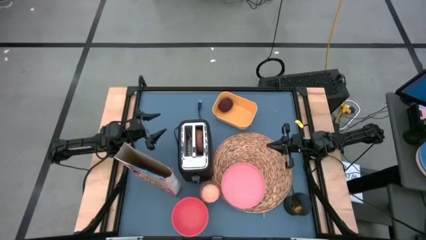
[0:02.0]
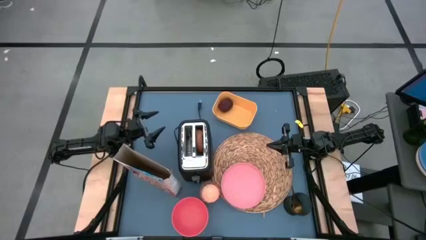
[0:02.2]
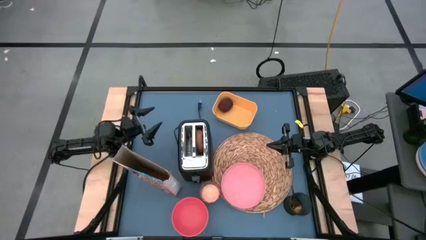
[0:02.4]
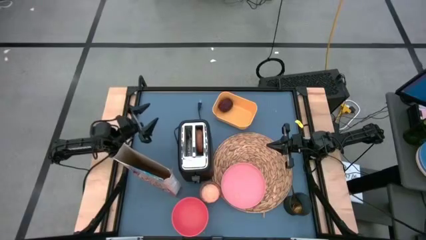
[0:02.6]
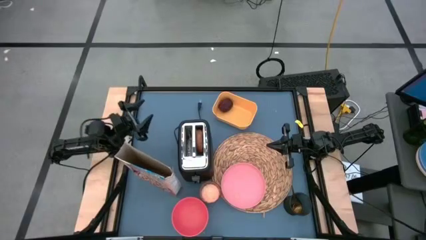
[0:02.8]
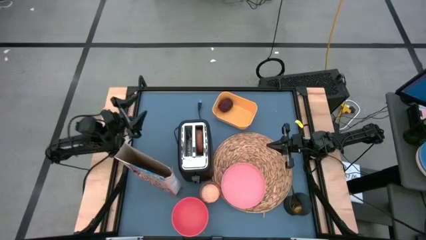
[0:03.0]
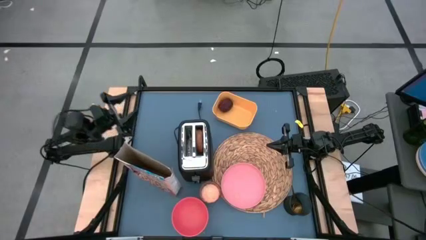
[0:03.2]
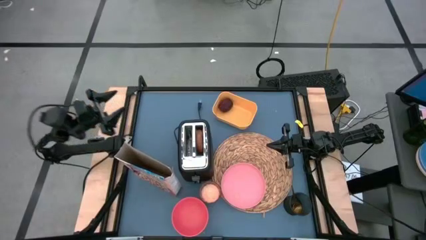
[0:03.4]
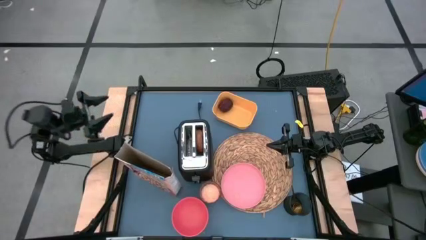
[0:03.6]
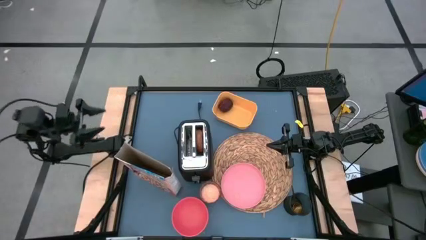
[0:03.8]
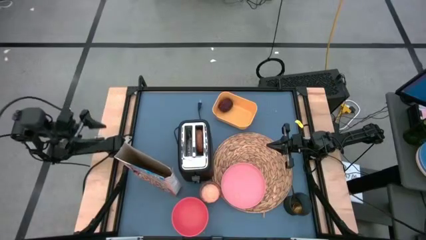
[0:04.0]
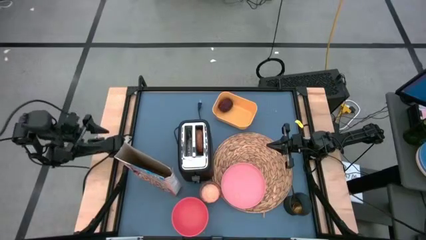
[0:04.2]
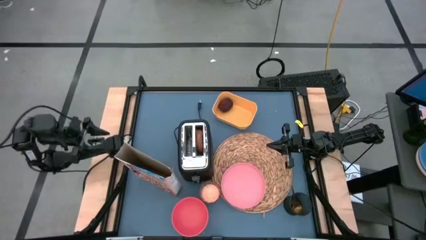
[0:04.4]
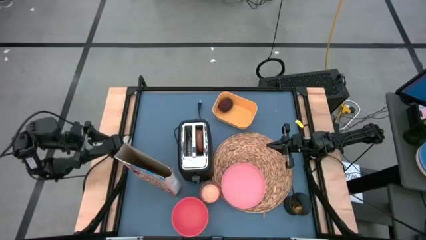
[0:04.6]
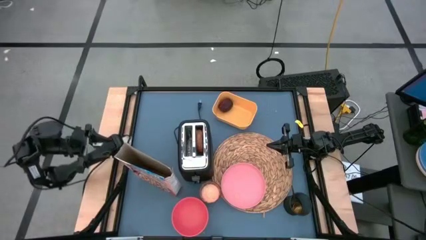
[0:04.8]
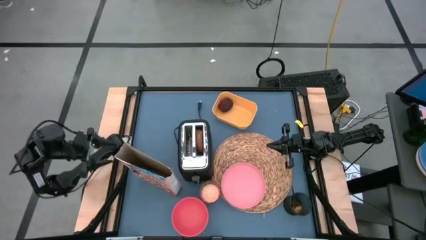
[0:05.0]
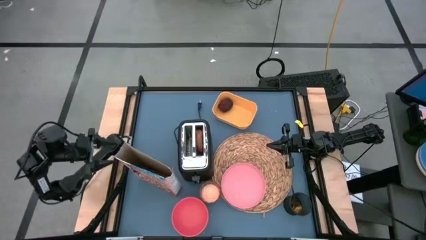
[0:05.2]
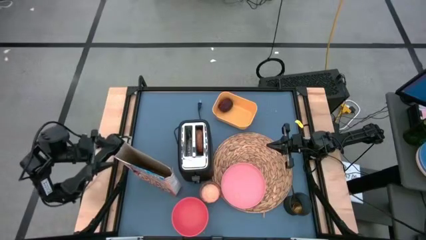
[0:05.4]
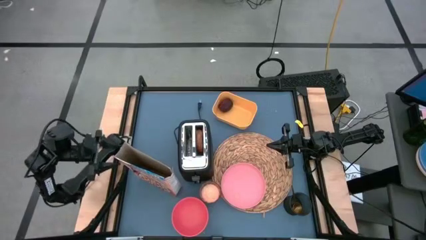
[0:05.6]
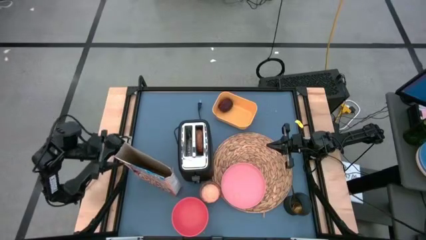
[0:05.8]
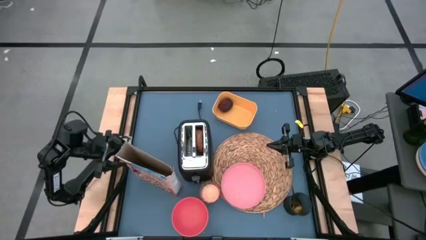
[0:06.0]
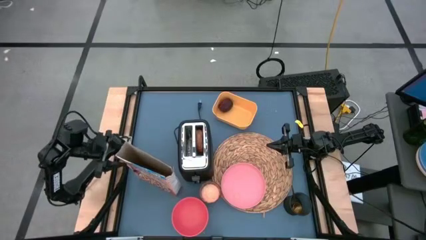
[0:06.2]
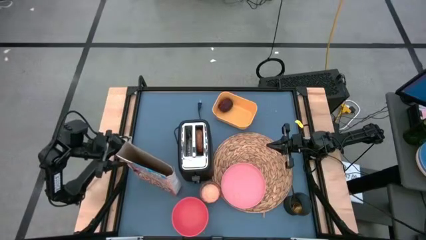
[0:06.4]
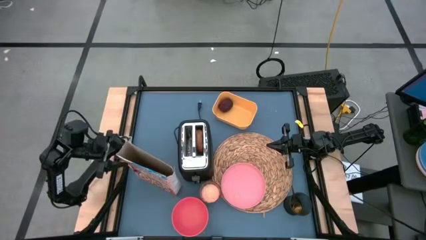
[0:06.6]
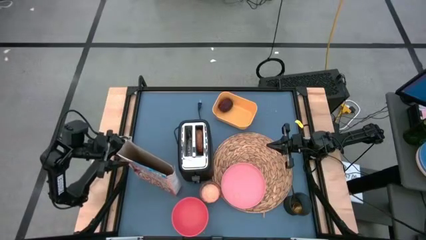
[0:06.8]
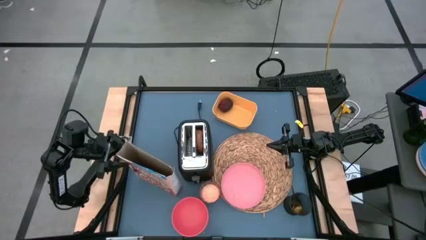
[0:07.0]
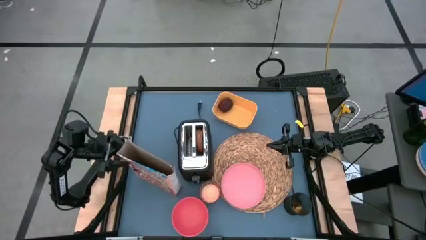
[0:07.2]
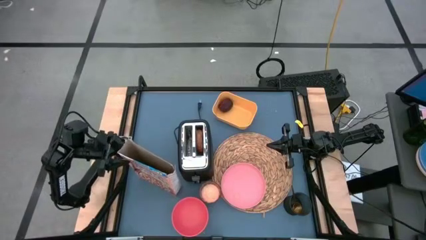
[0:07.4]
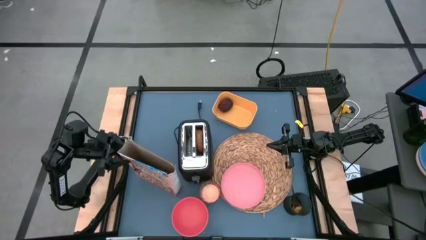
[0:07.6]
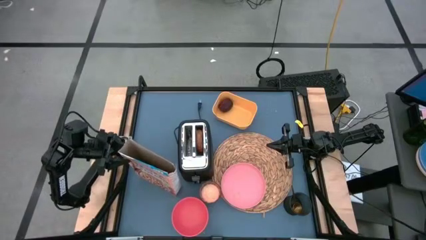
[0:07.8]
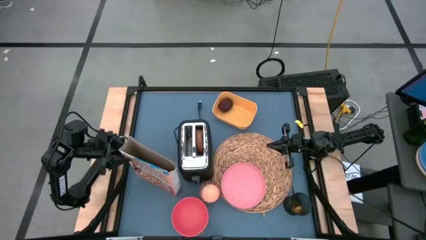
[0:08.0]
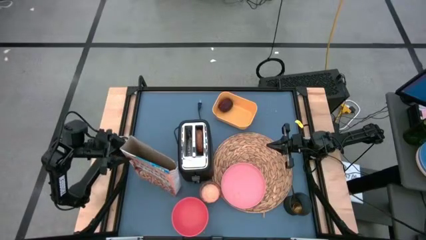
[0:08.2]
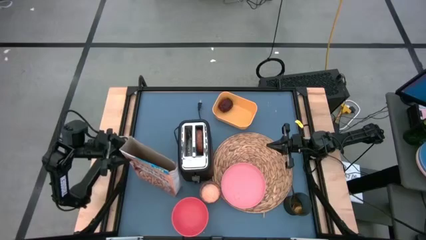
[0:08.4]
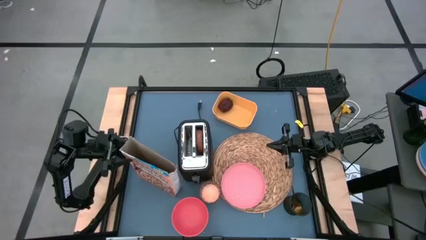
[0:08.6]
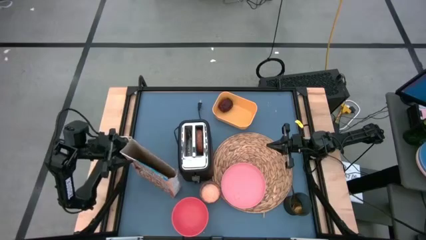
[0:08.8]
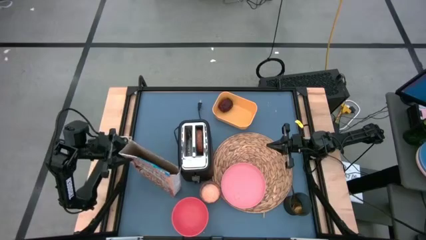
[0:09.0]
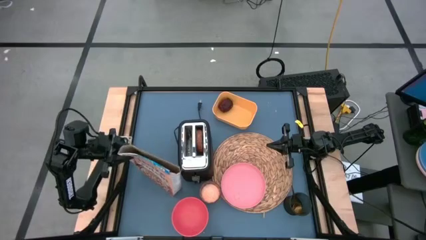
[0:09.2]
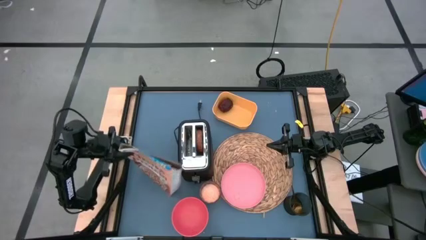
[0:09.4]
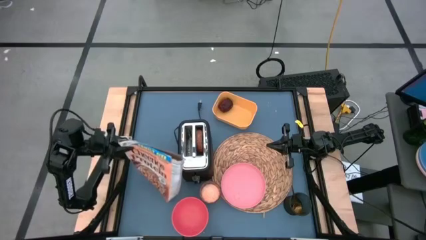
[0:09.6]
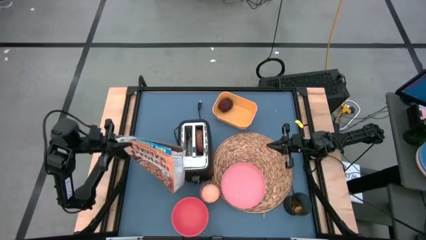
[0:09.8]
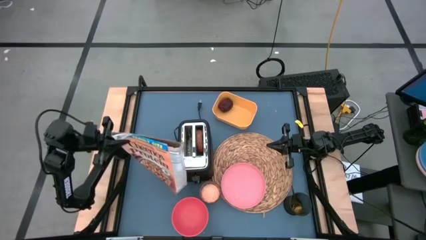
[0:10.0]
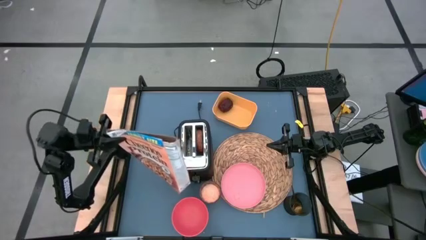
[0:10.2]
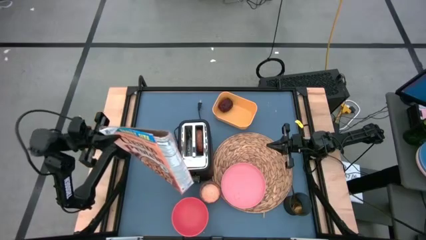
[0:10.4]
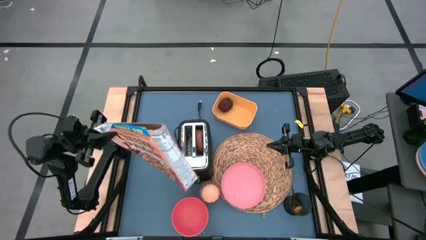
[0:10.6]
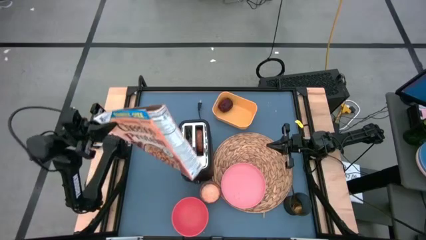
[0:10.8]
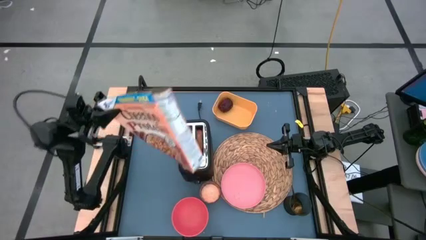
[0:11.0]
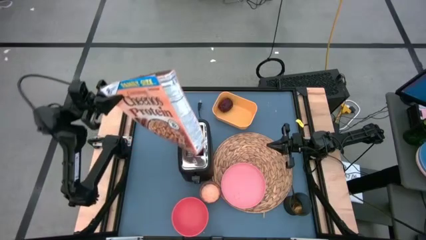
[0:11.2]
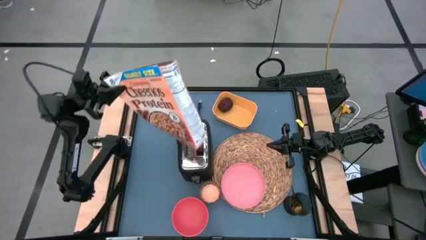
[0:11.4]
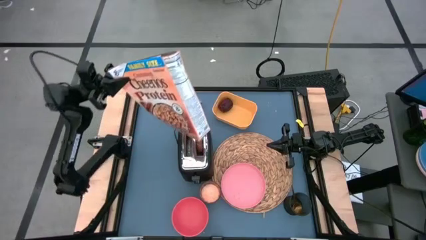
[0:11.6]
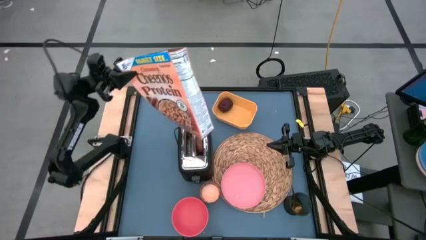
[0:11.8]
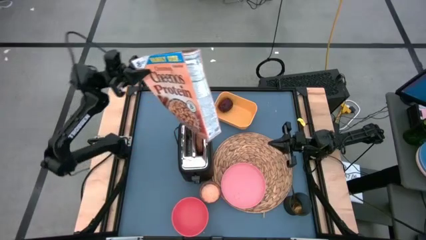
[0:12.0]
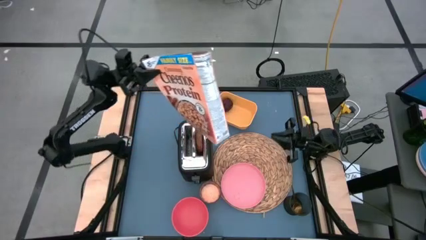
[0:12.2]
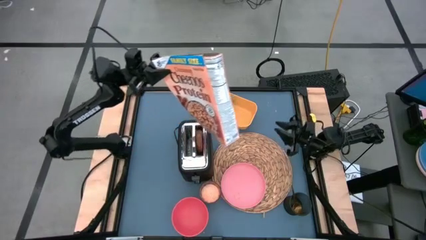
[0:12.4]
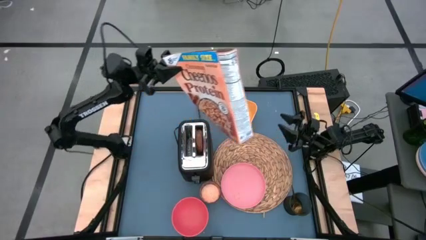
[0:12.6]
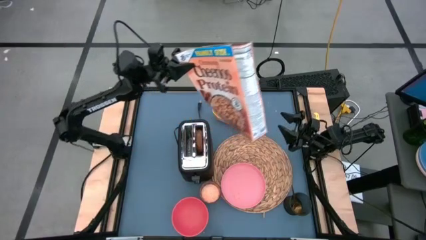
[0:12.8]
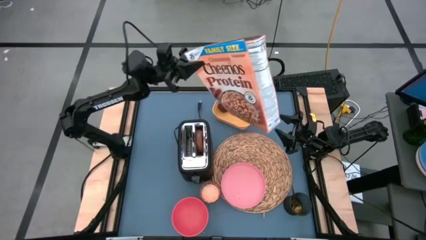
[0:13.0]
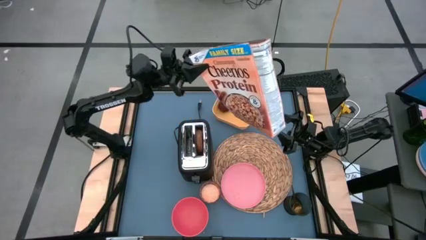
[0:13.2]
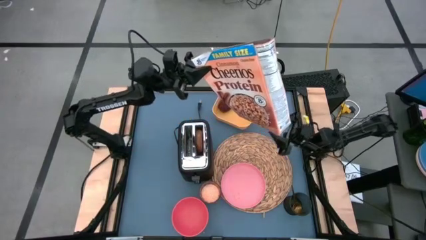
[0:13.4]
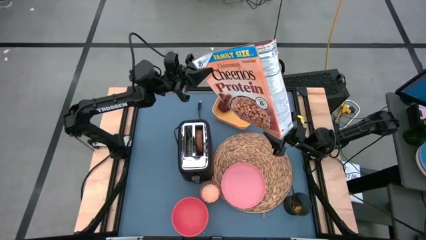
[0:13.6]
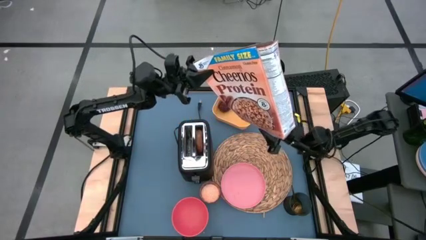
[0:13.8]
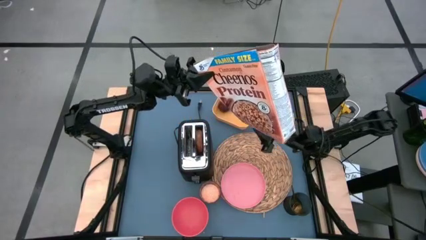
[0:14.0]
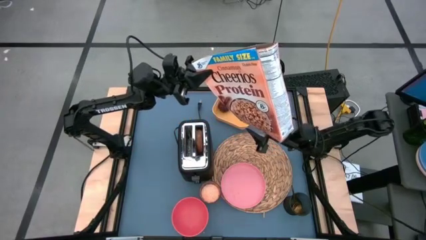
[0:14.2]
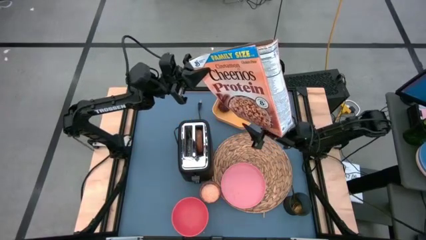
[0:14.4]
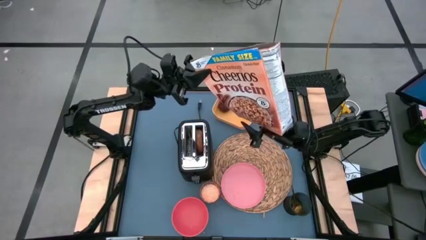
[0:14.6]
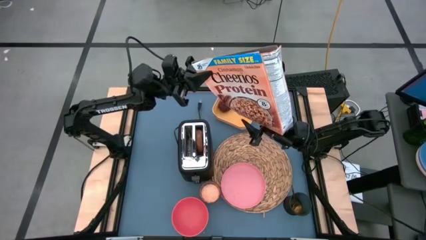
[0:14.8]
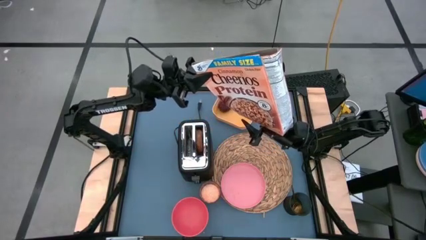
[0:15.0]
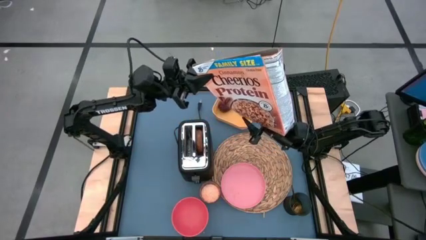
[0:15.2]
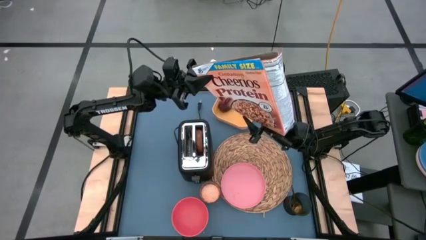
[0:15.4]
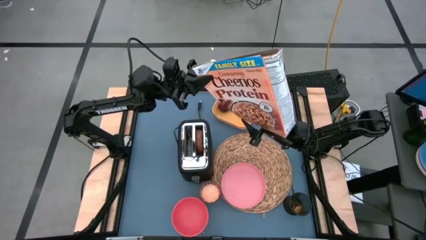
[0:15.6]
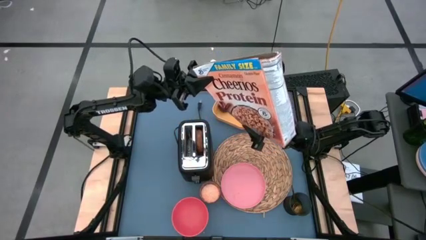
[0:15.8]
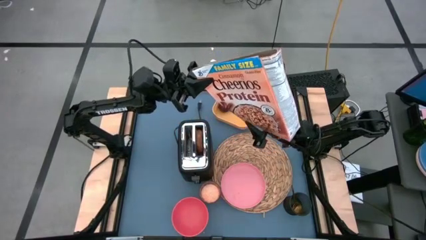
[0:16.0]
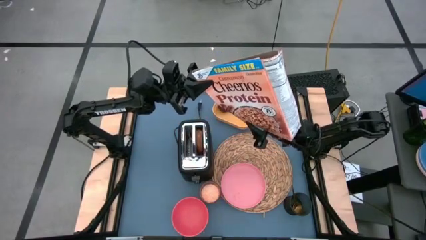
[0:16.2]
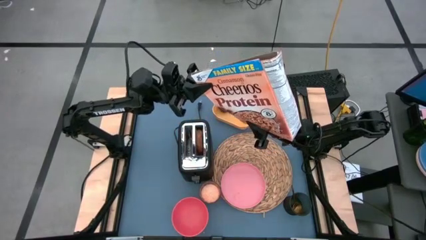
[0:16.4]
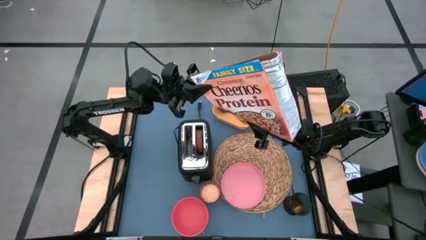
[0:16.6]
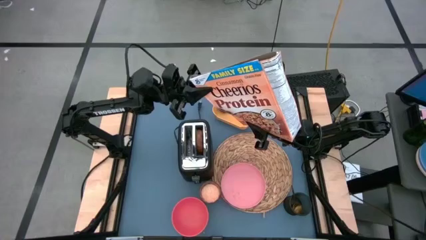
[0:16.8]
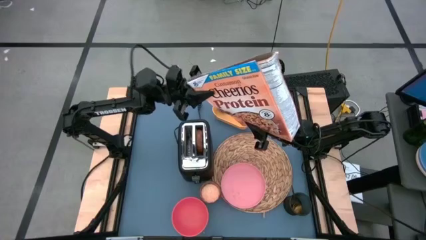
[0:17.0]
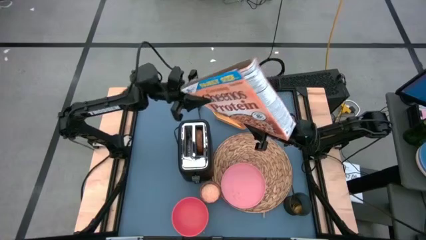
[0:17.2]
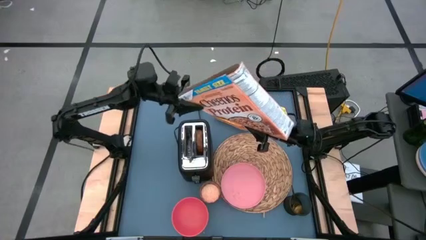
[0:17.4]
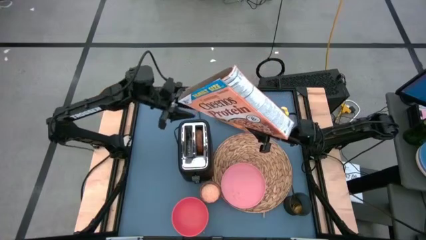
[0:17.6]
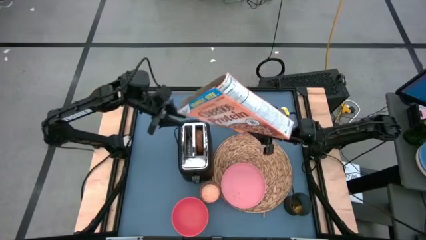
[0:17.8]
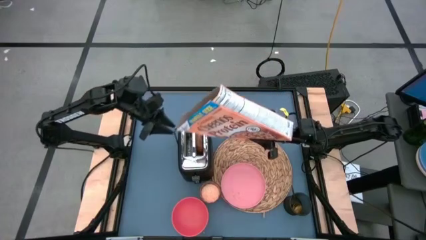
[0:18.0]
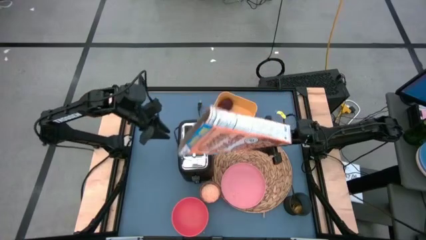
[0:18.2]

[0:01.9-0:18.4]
Task: Arrange a breakfast setting
Pour the cereal into the orange bowl
